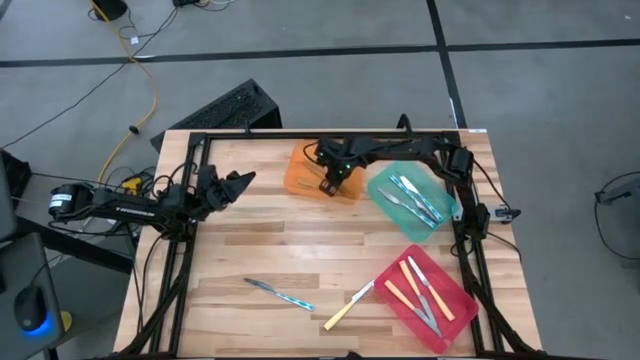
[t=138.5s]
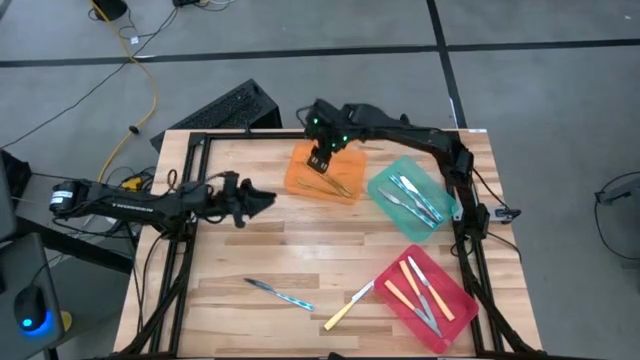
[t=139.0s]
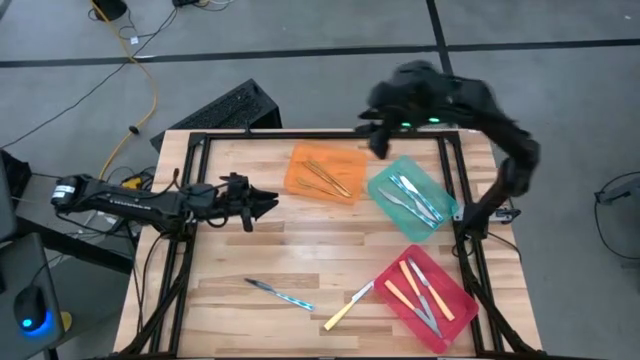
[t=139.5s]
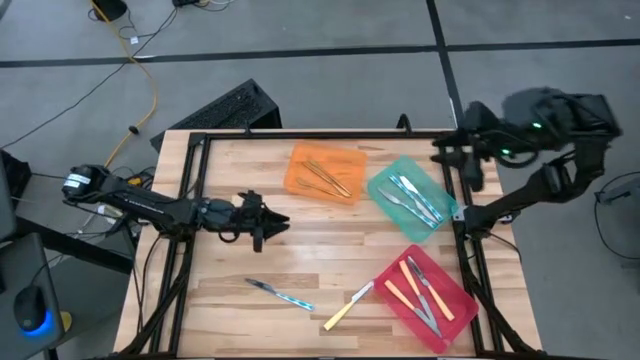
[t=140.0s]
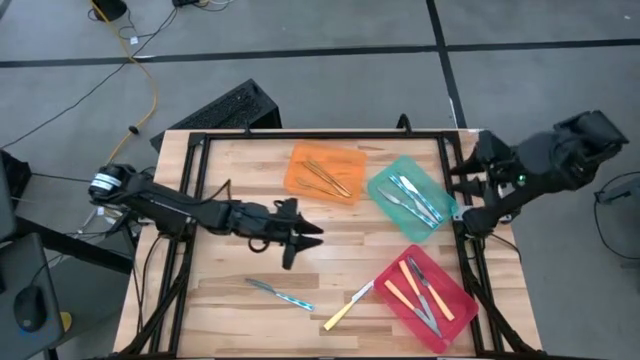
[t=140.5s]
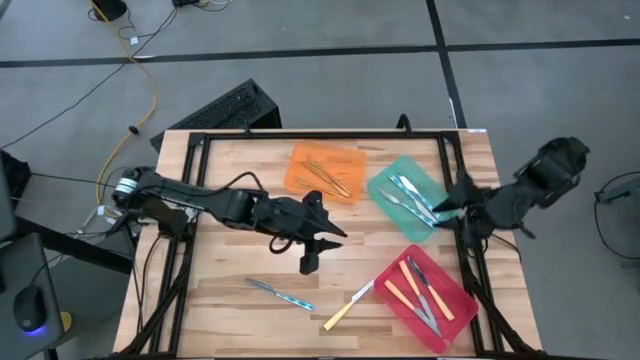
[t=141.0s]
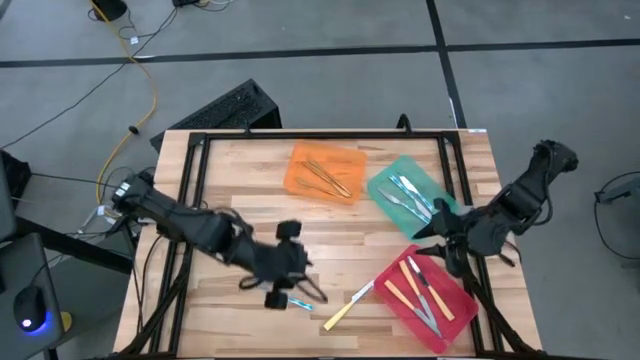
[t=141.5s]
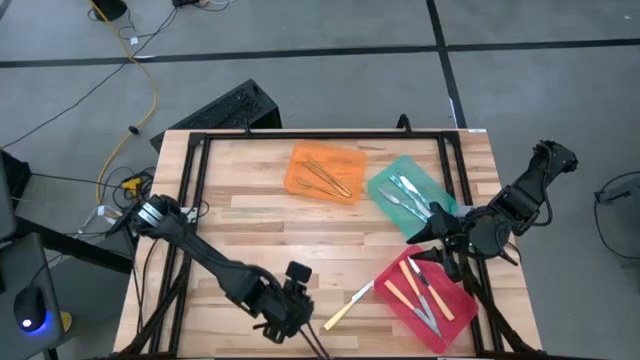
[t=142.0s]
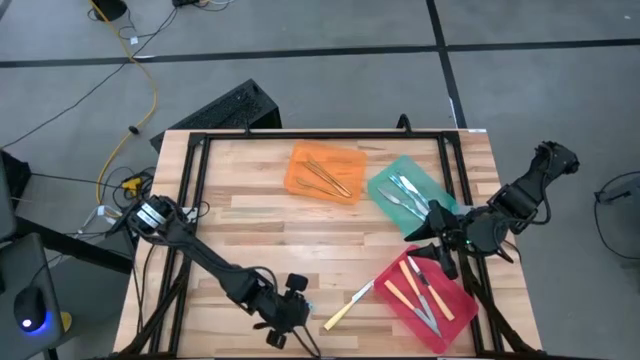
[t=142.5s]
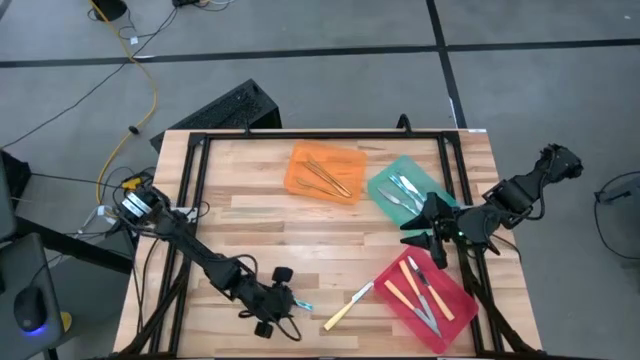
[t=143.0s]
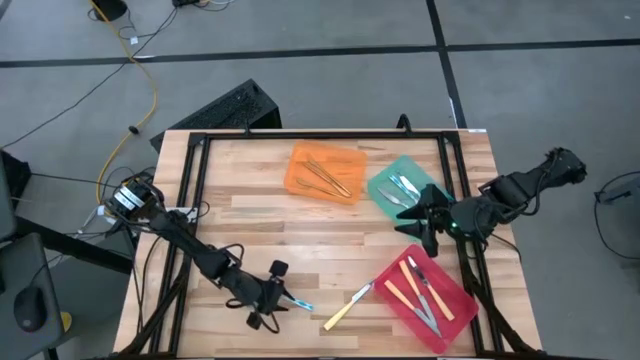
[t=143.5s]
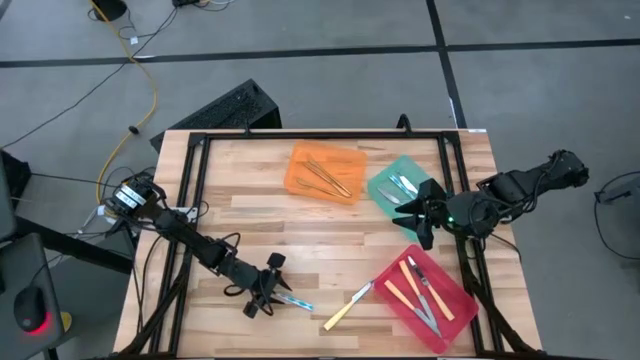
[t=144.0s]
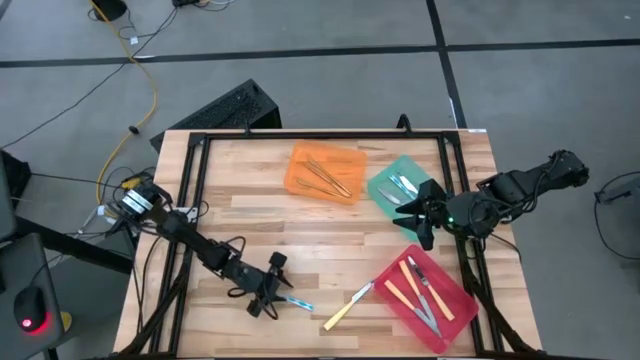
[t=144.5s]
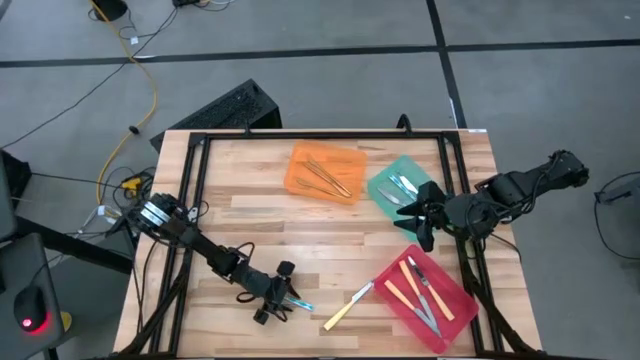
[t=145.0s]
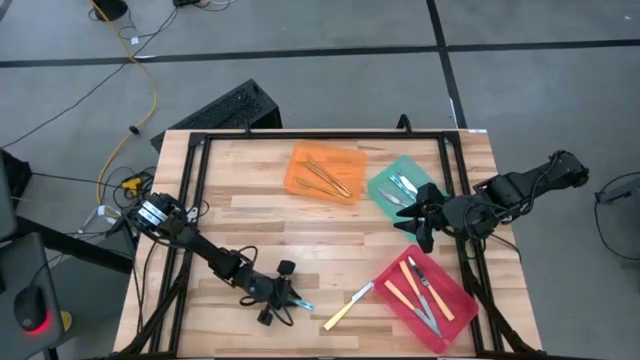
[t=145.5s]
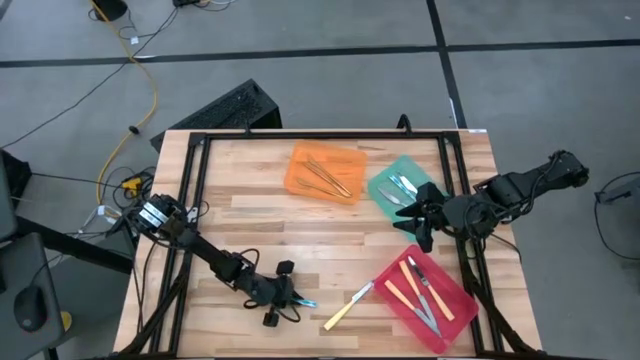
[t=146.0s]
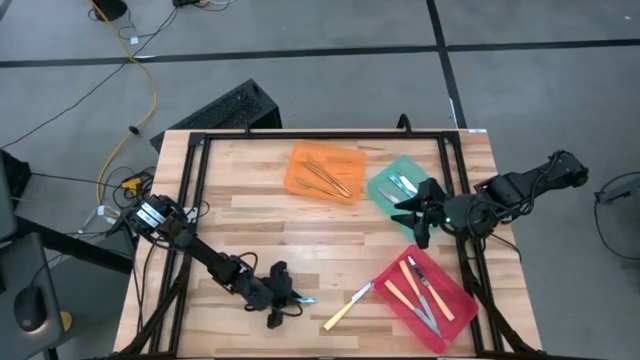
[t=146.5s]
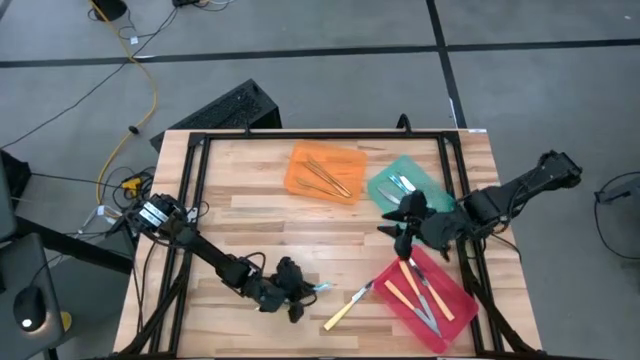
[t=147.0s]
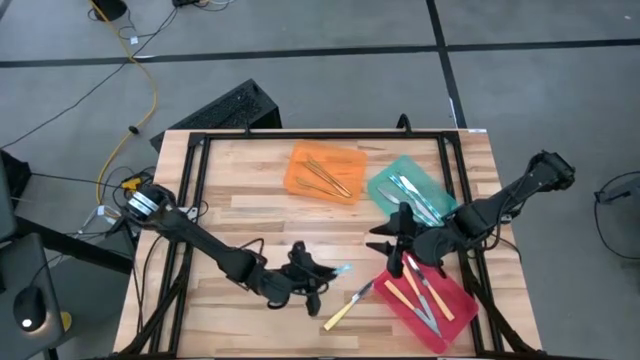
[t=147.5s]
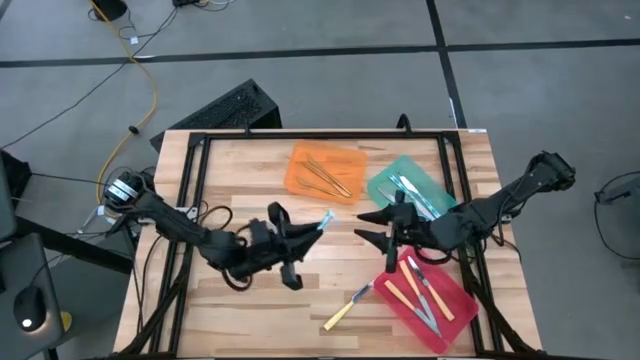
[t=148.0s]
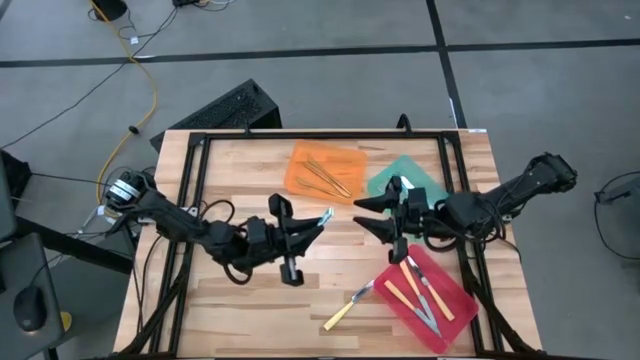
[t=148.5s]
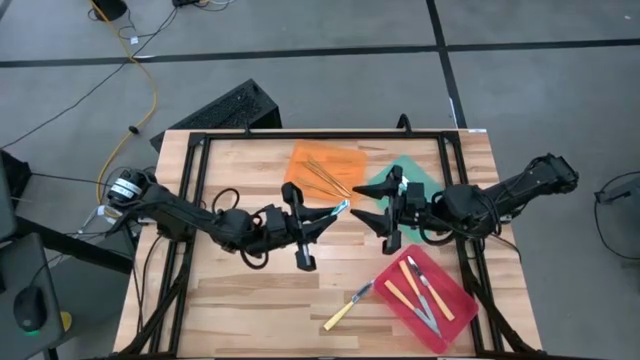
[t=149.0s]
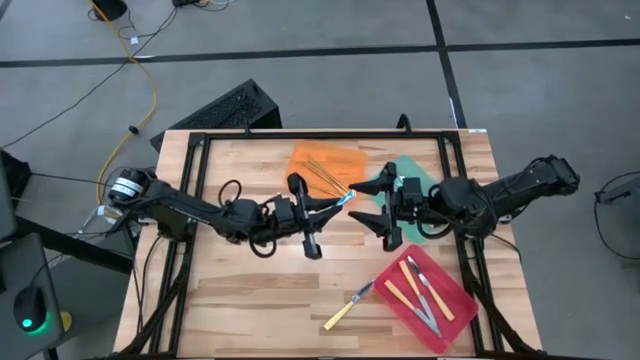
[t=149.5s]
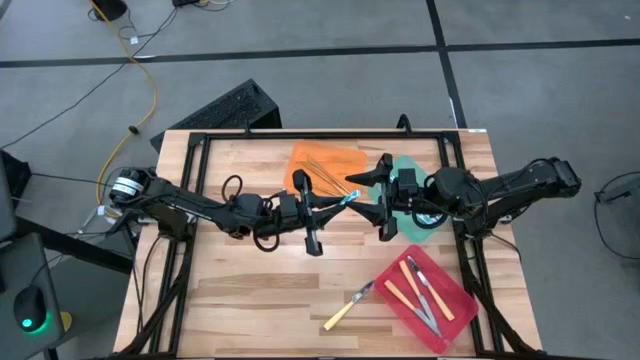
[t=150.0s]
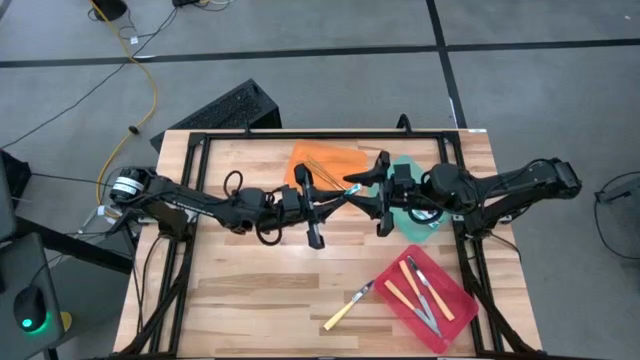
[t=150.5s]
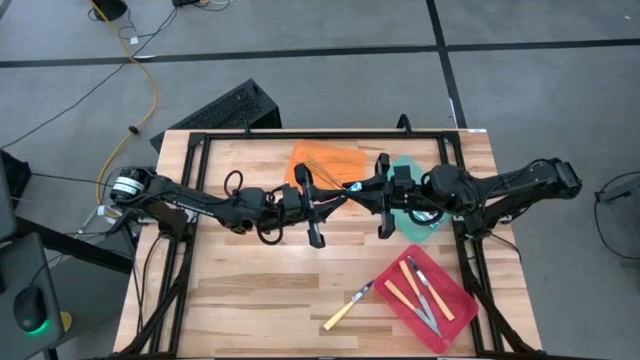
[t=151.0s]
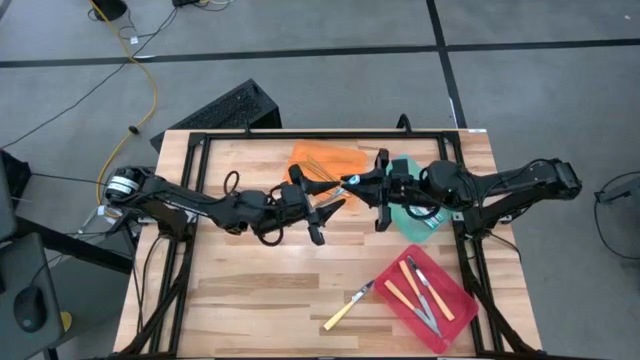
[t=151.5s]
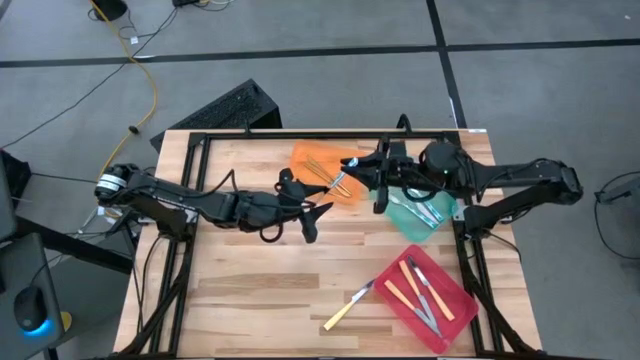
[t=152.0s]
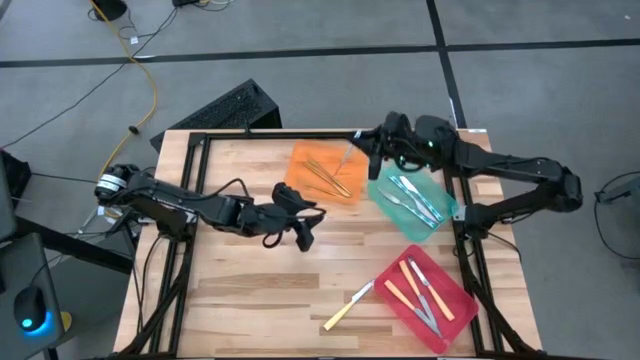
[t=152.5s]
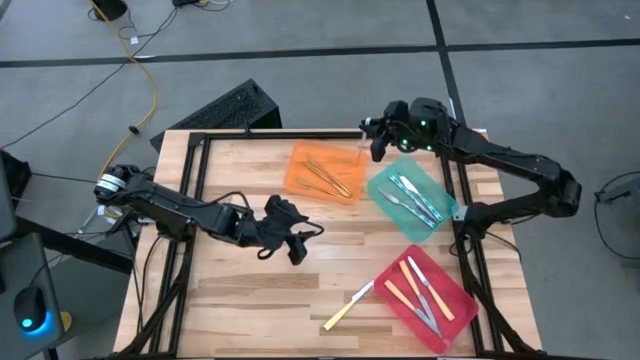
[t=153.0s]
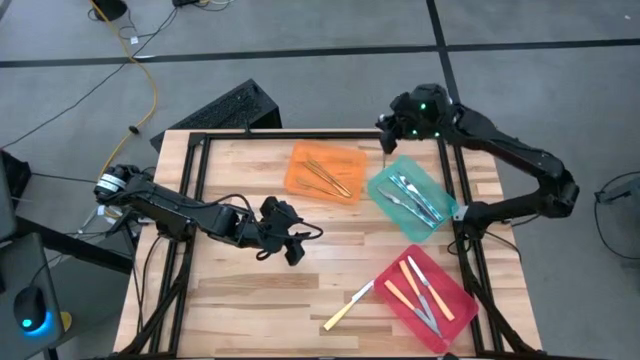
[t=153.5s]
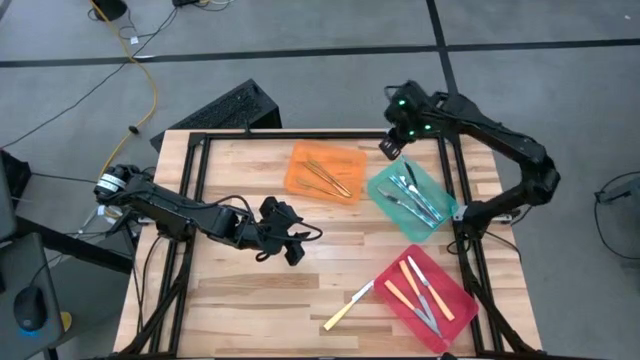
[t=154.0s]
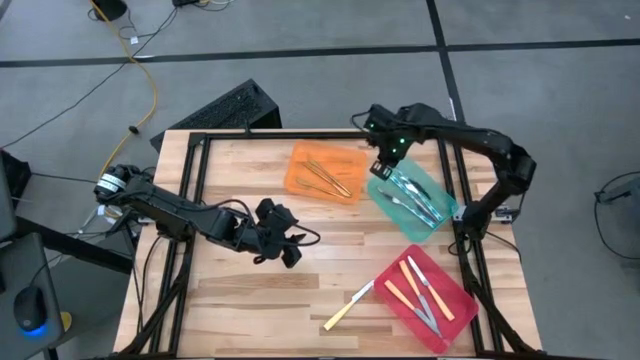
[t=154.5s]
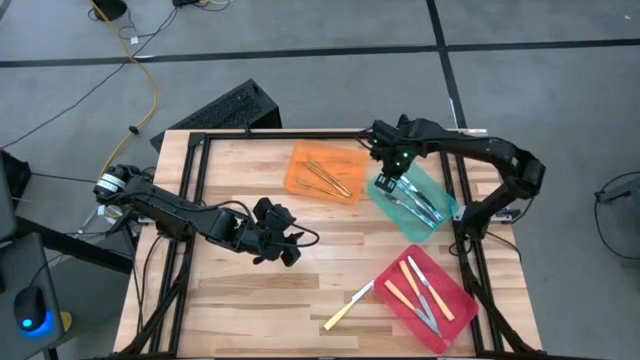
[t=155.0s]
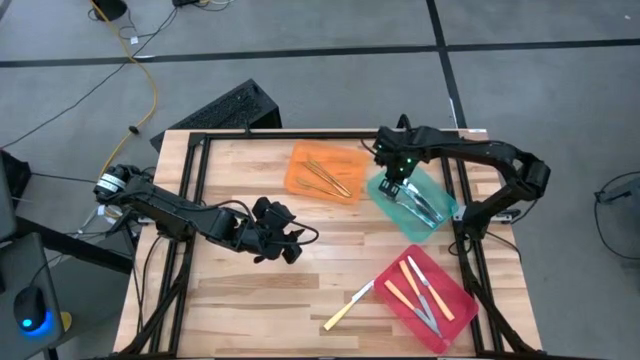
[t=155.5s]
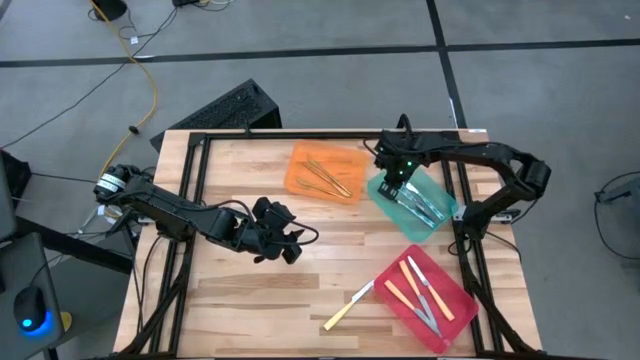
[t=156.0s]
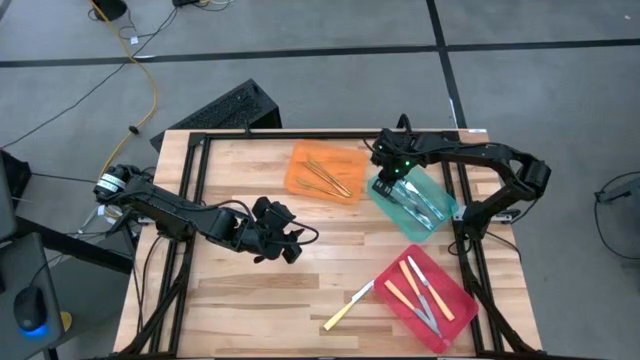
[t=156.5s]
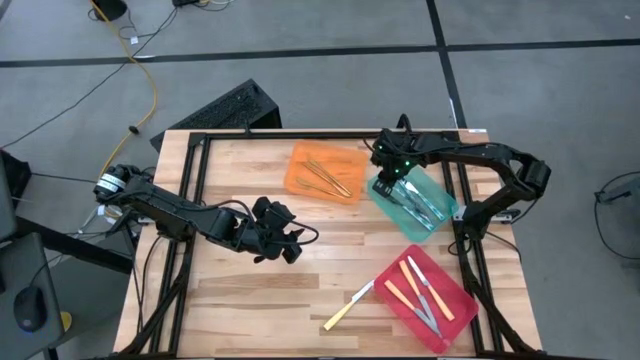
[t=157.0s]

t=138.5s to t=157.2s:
Task: Sort silverware by color (type)
Put the white patterned knife into the blue bin

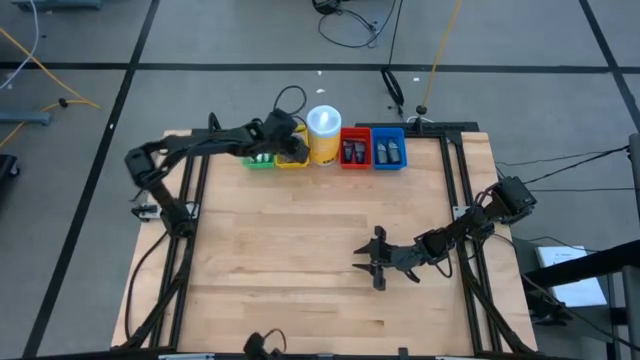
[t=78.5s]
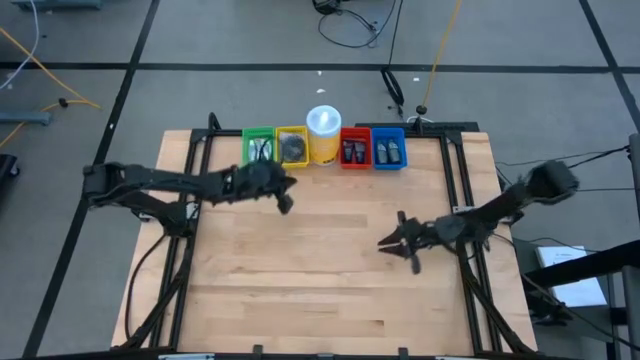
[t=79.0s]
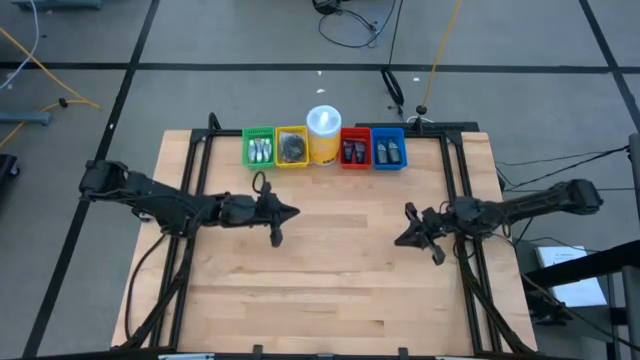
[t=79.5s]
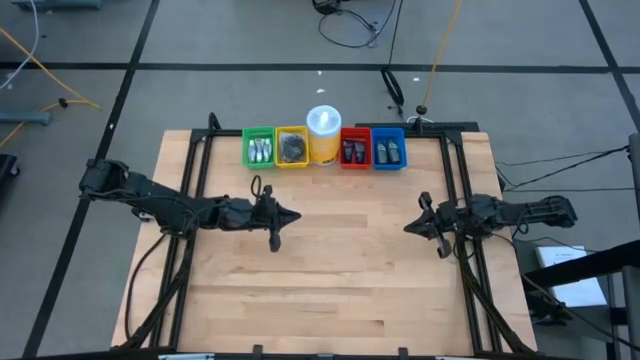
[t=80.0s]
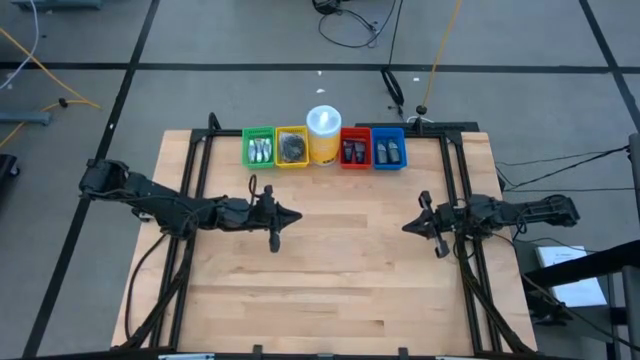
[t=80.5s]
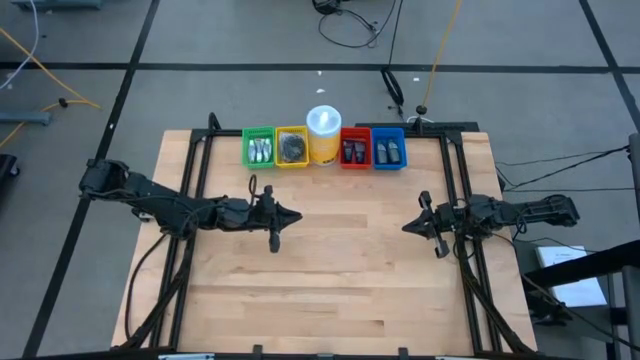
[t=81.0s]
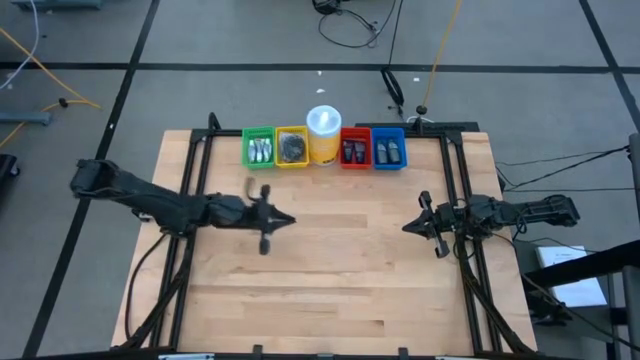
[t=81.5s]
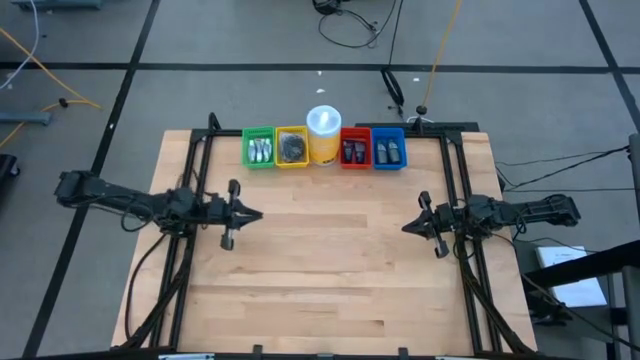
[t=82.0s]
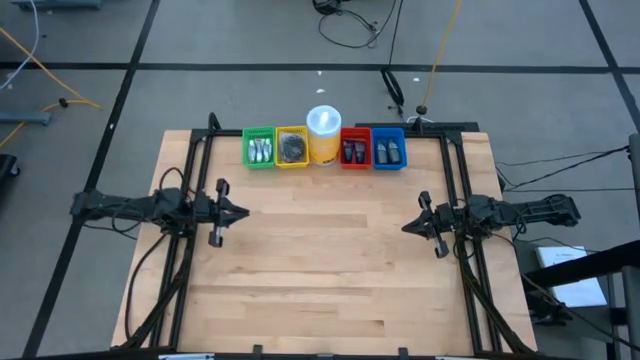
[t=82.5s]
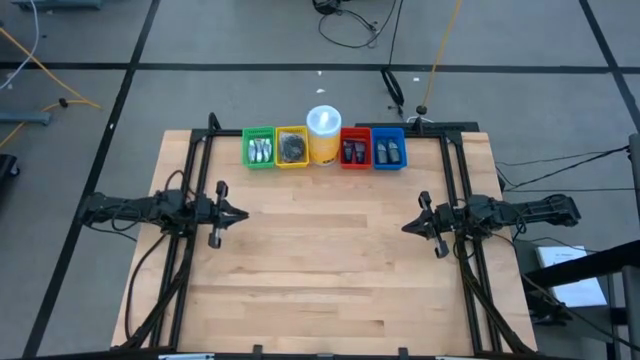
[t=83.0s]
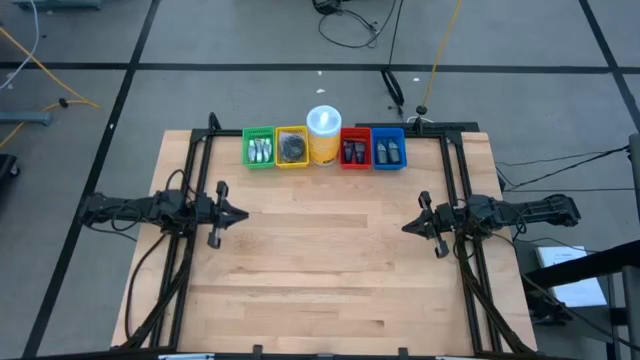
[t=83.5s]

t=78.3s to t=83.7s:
Task: Pick & Place Travel size toiletries
Return to Home Position
